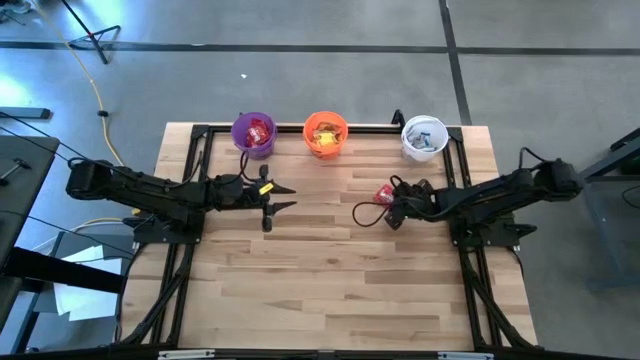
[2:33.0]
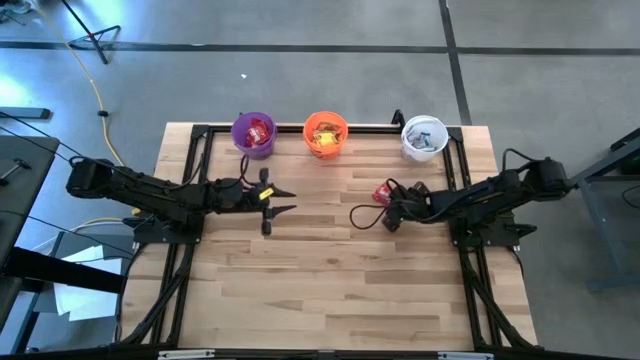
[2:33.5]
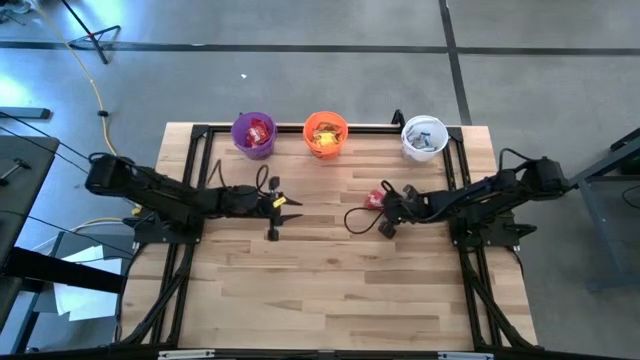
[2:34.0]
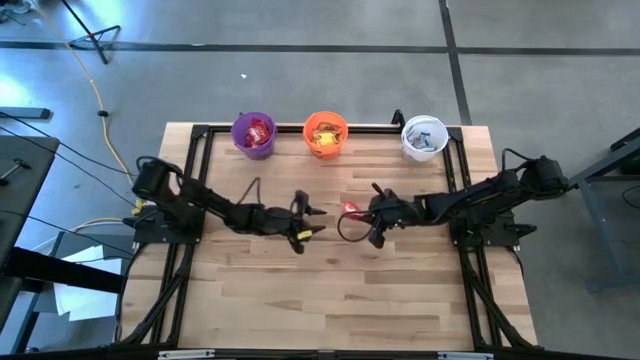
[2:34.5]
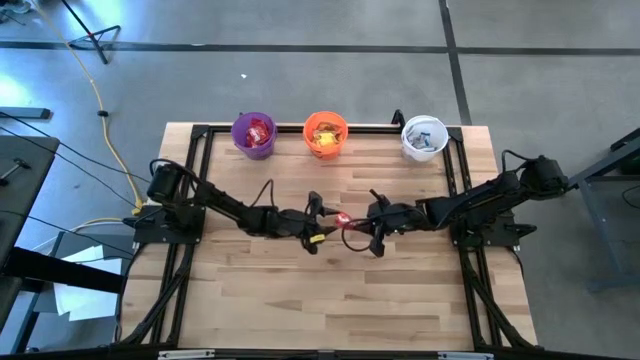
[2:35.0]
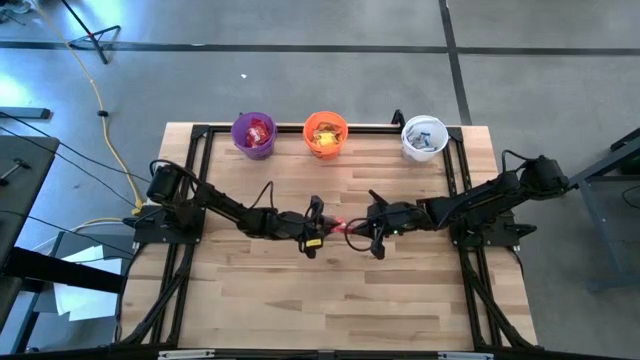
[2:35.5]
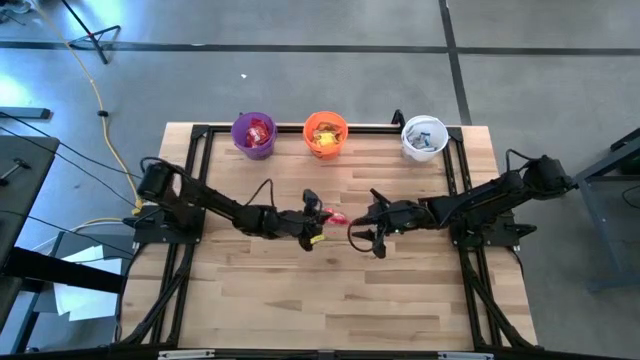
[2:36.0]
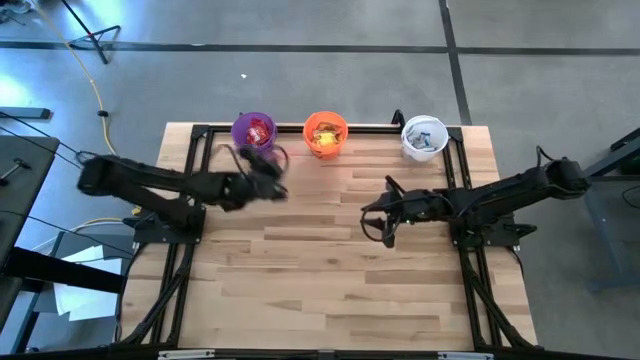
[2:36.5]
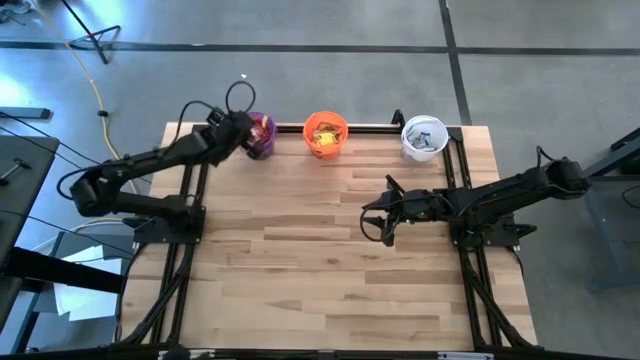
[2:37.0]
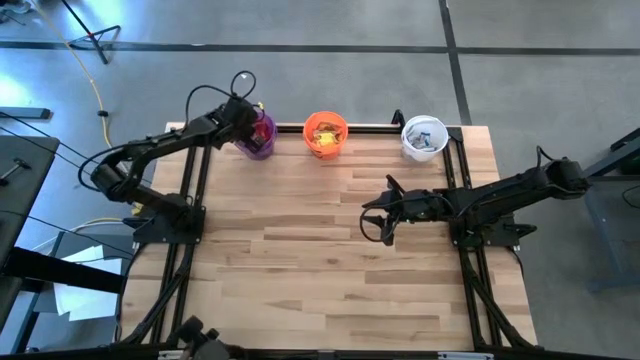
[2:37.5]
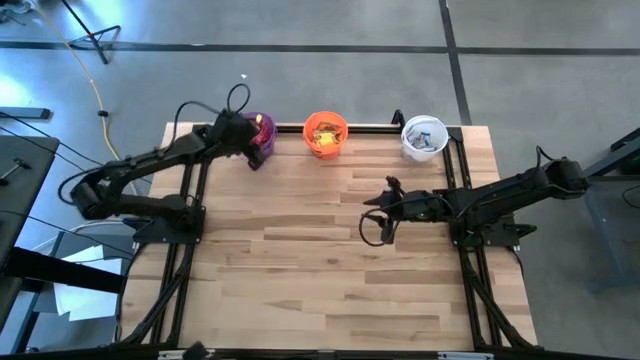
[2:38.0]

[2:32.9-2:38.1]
Task: Sort candy
Put the red candy into the violet bucket

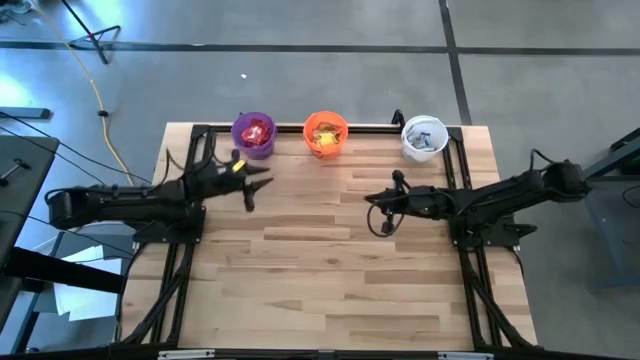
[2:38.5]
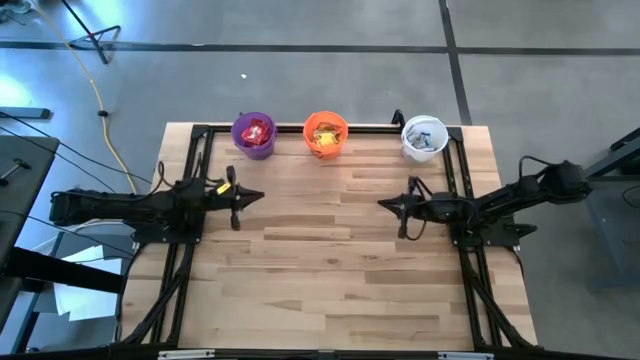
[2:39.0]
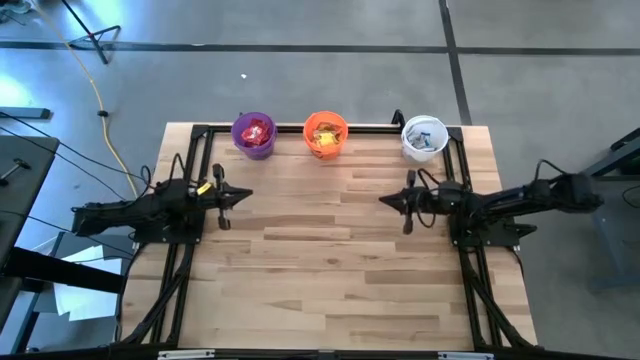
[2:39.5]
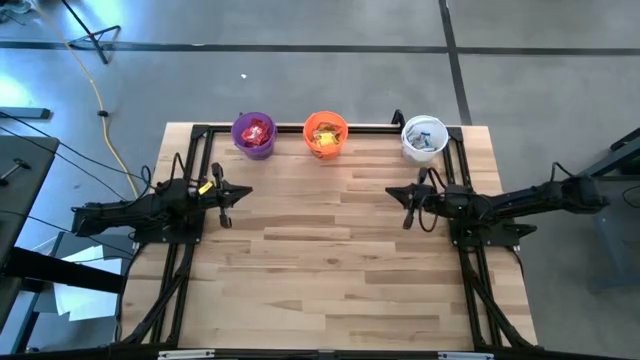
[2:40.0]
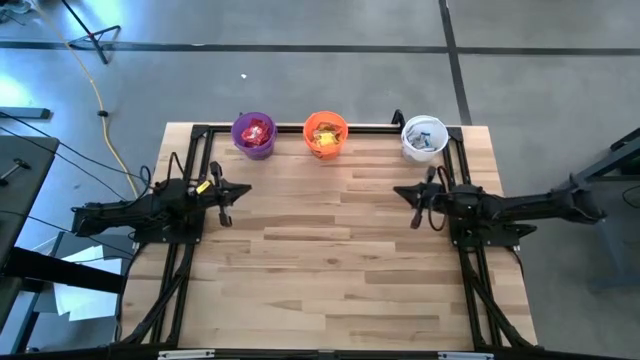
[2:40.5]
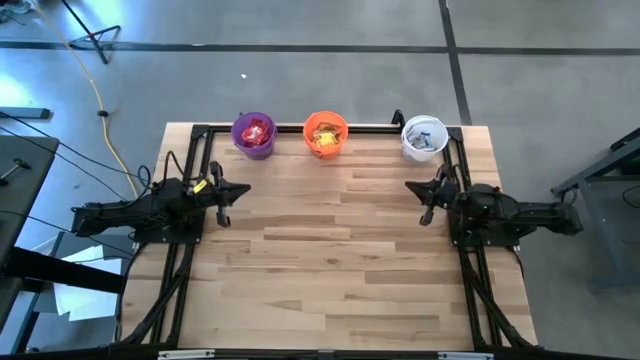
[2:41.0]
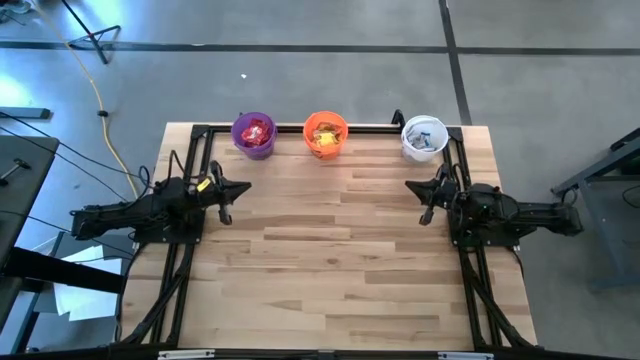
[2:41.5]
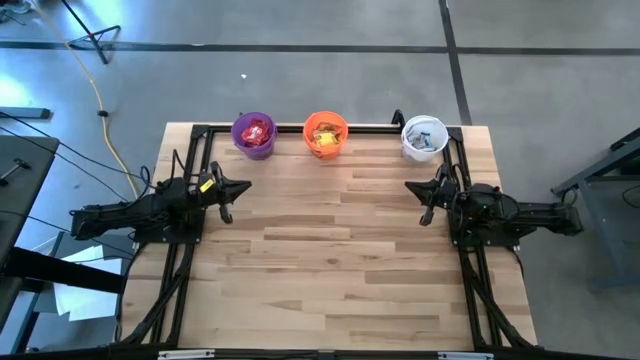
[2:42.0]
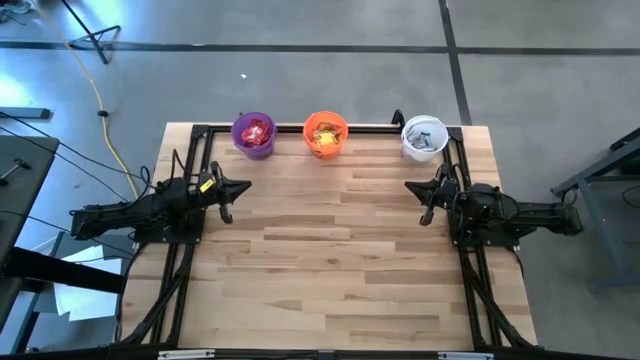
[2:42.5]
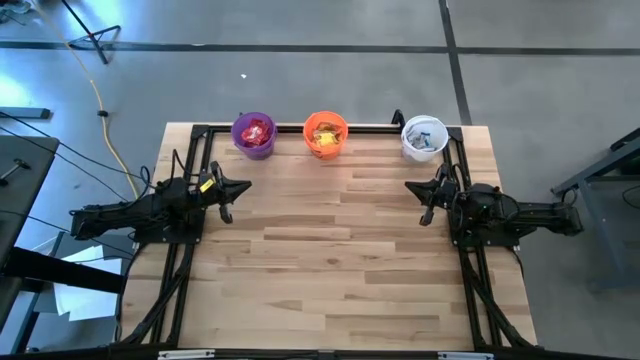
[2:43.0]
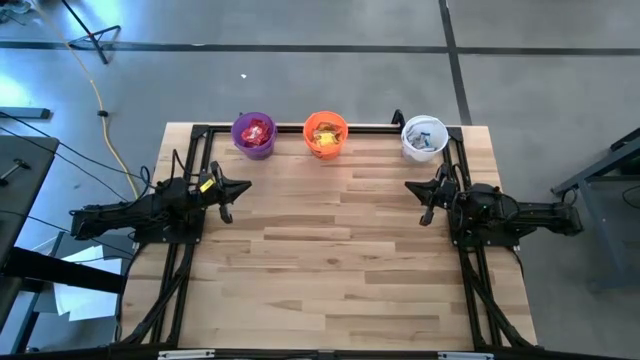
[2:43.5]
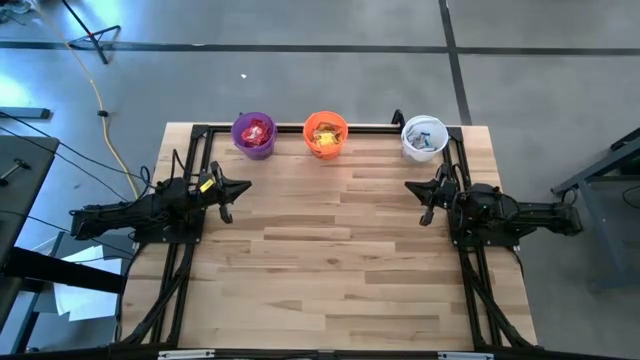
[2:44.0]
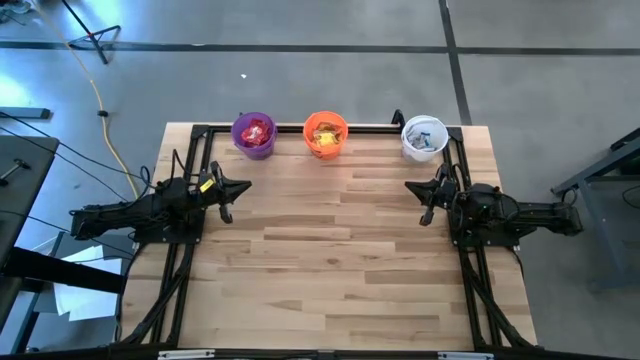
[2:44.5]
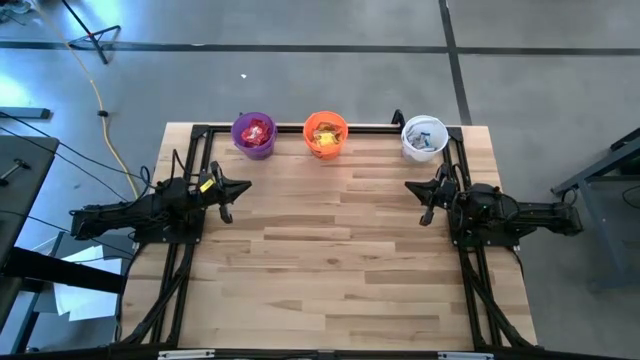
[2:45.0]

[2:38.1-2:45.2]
Return to Home Position

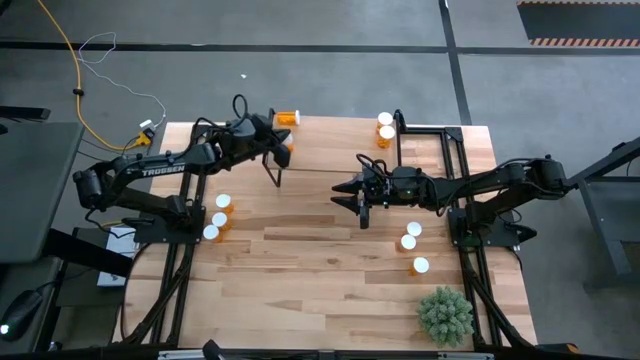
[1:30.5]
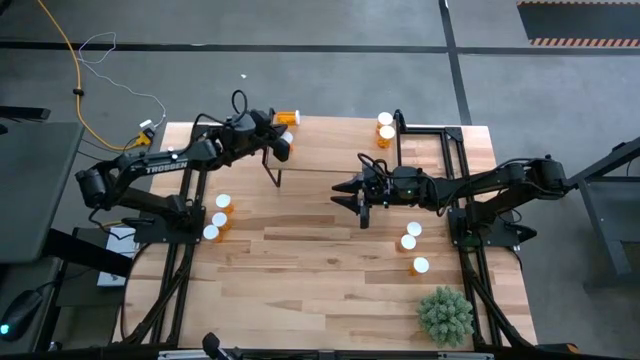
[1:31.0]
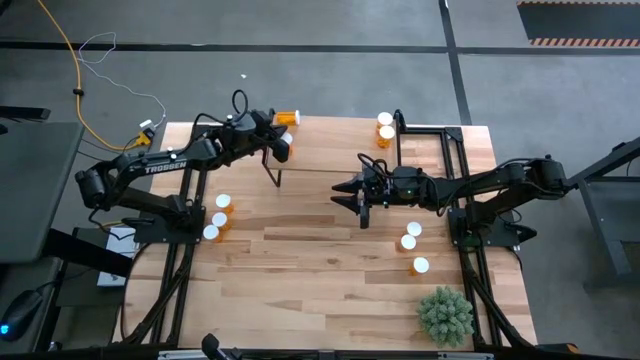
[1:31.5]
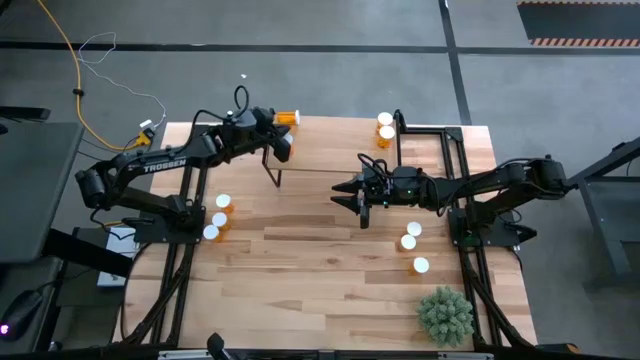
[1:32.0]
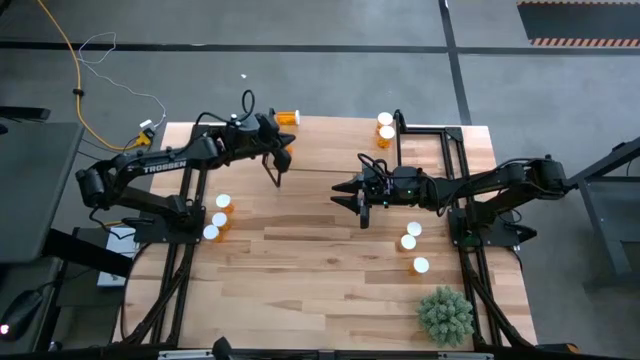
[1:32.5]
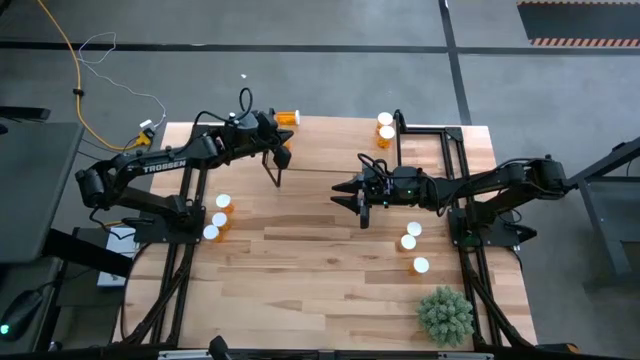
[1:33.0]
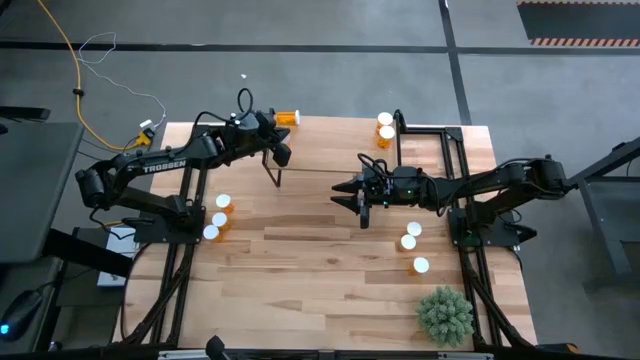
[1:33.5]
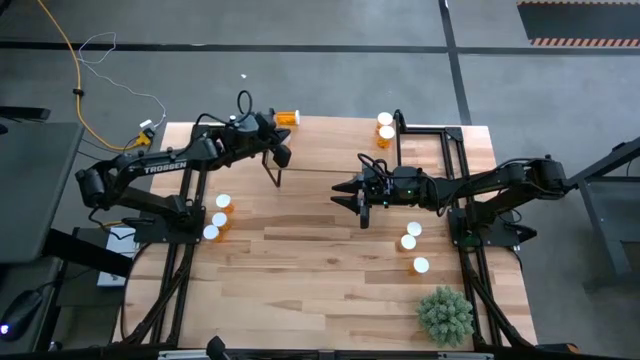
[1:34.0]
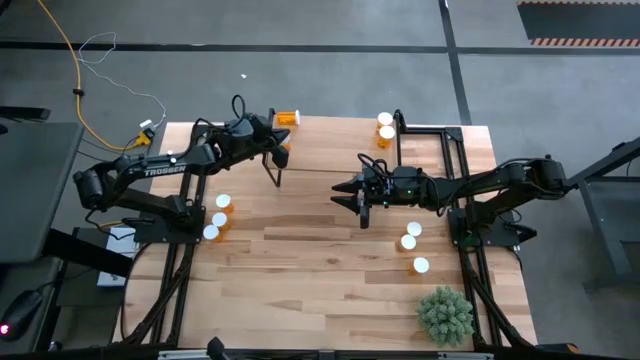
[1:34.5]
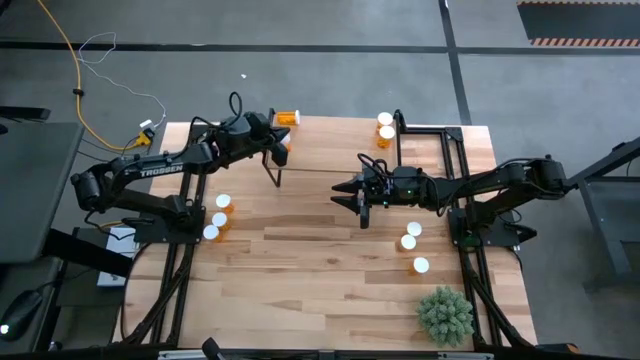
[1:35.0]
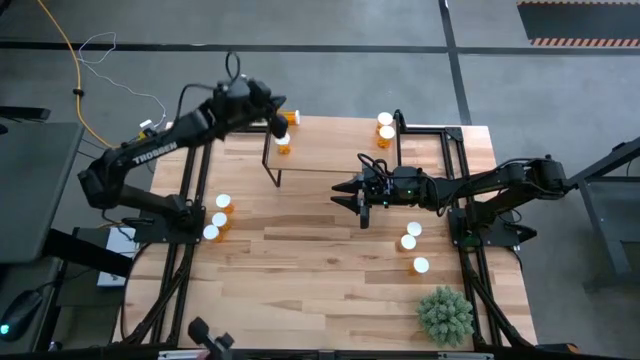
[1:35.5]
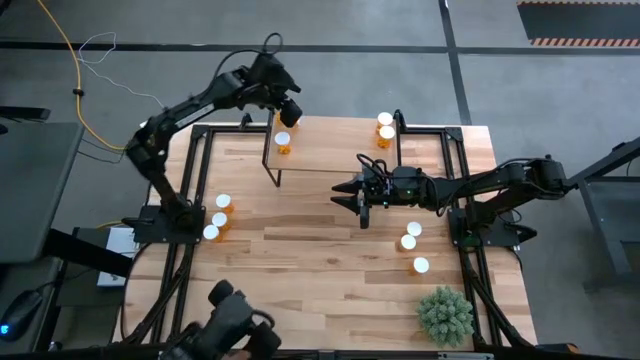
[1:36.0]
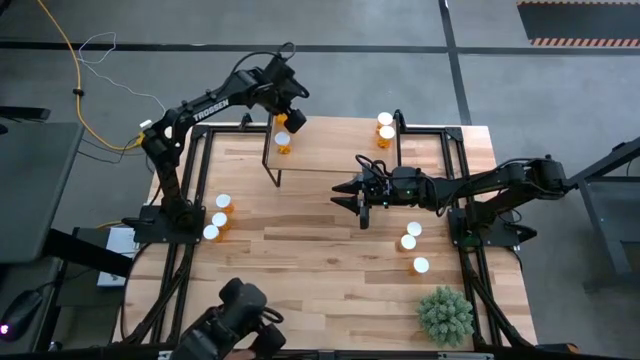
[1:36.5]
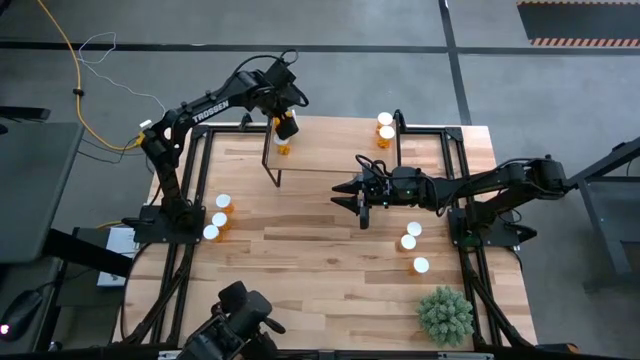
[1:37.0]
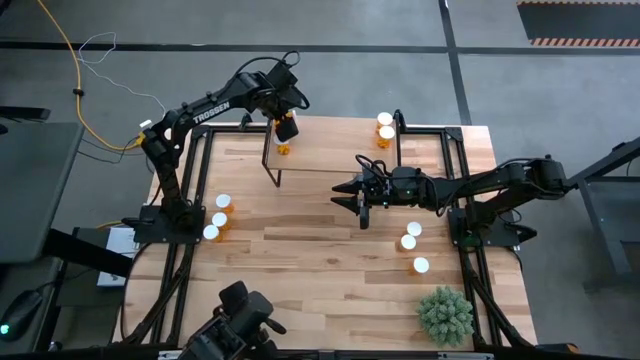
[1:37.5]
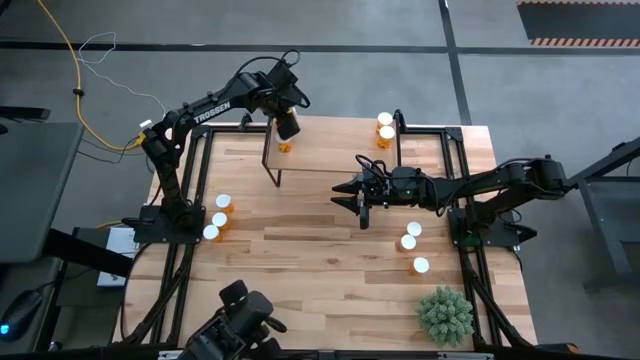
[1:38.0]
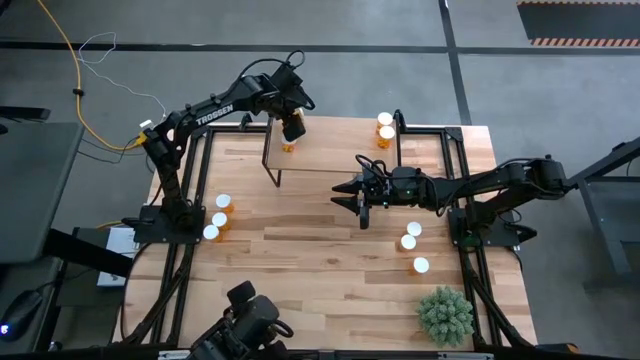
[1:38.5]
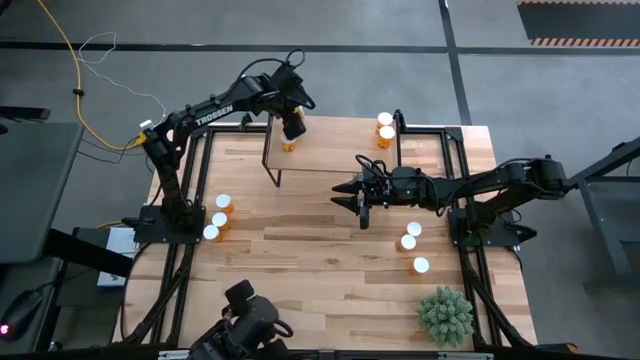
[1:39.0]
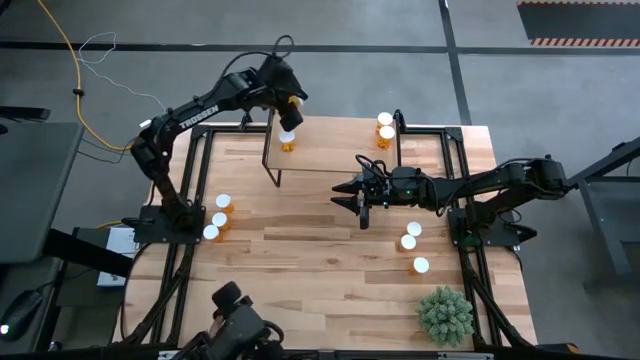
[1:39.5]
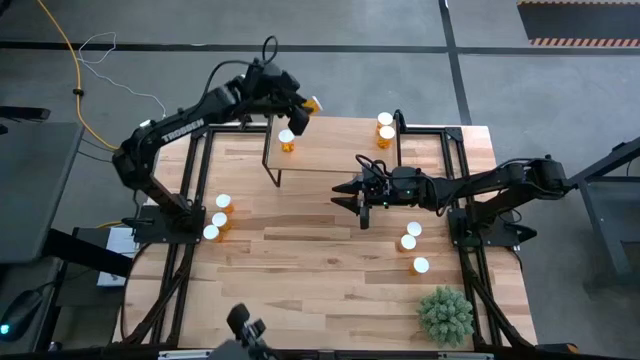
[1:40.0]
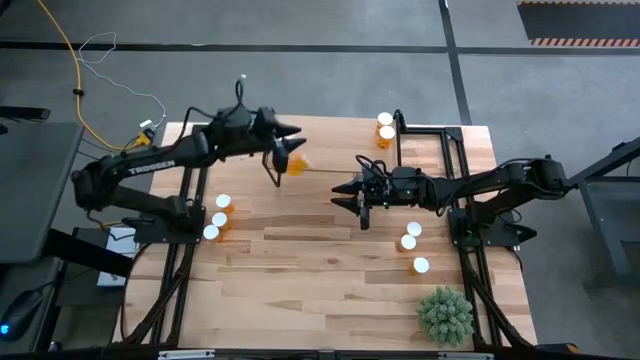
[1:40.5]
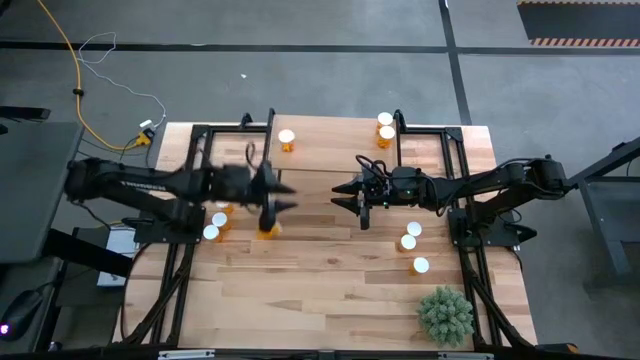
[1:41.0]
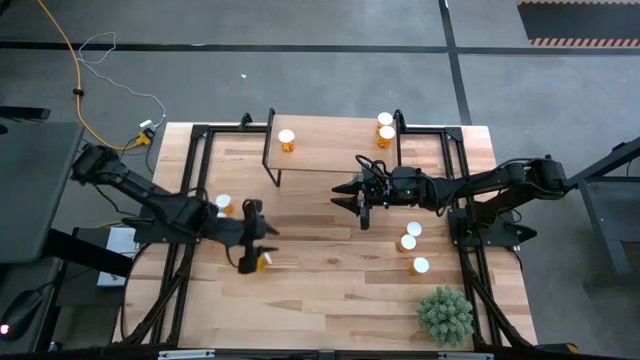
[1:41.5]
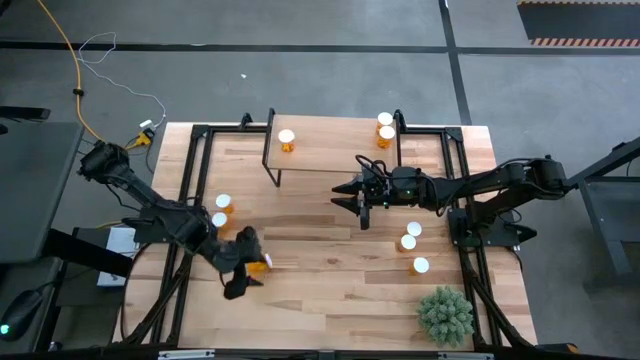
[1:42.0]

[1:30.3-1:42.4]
Task: Pick and place medicine bottles onto shelf by color
Put the yellow pill bottle on the shelf
